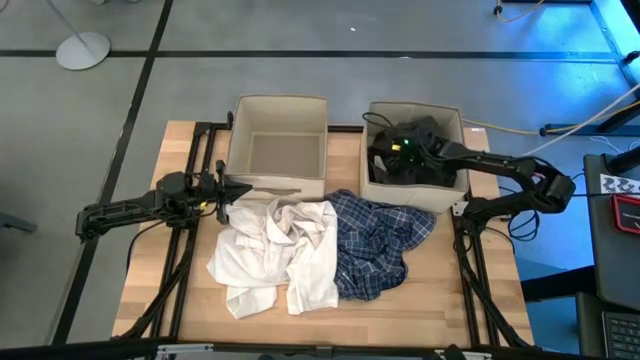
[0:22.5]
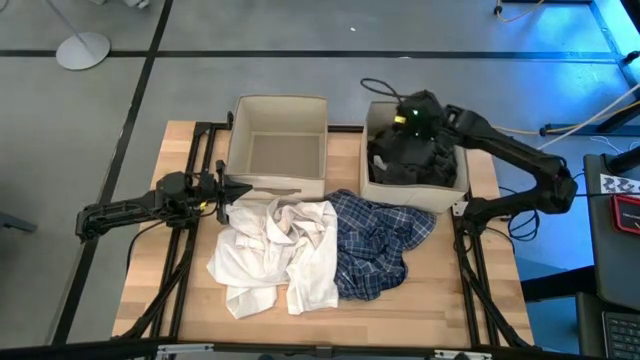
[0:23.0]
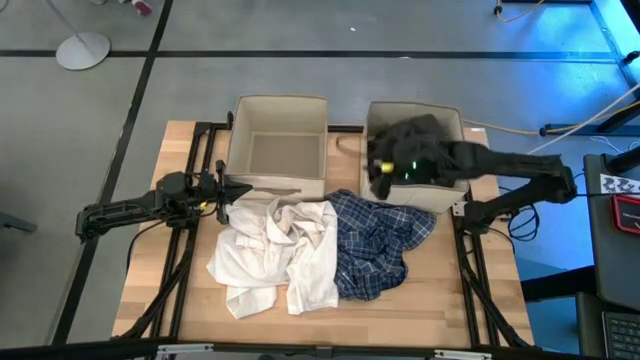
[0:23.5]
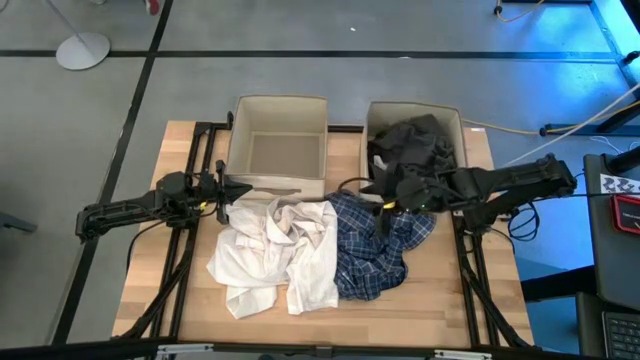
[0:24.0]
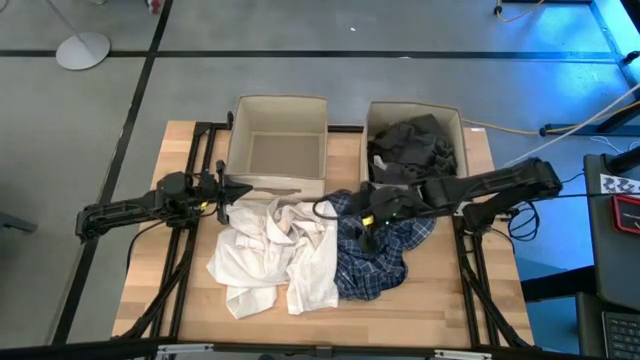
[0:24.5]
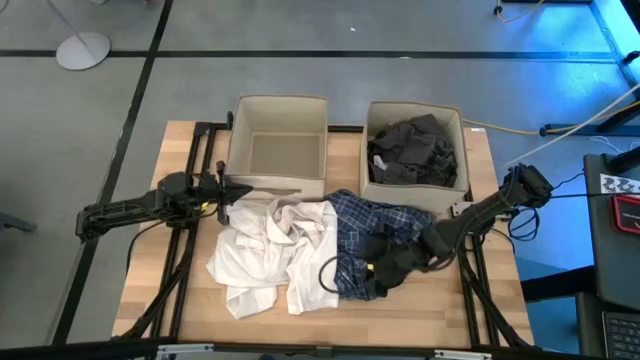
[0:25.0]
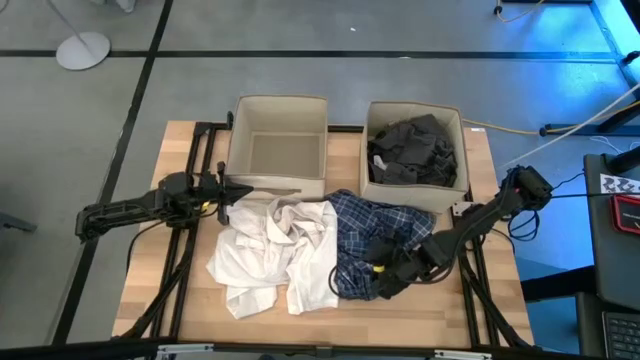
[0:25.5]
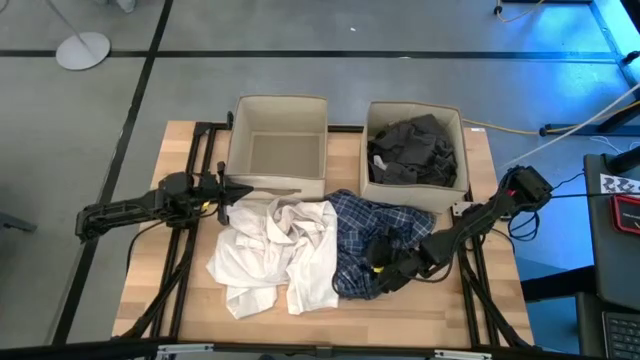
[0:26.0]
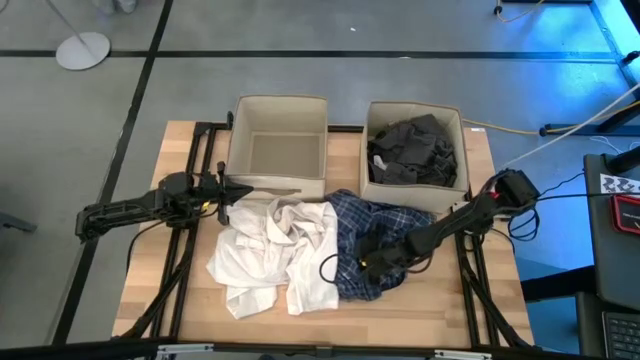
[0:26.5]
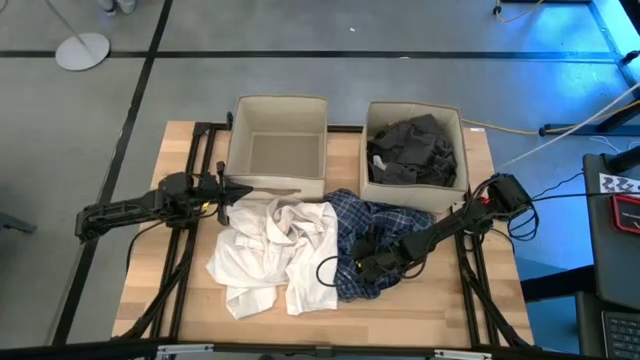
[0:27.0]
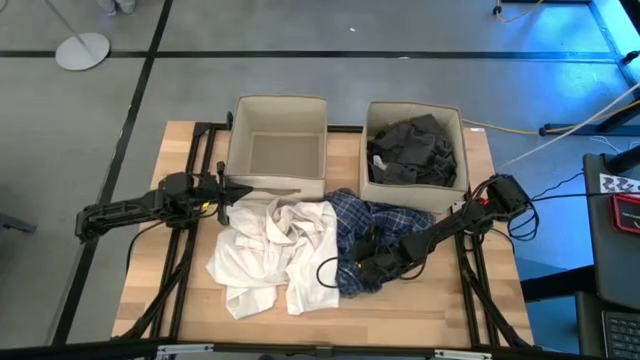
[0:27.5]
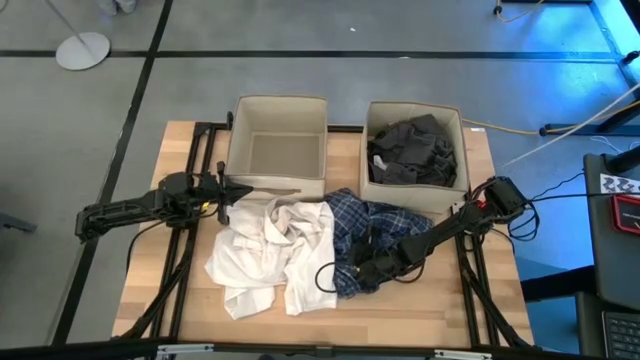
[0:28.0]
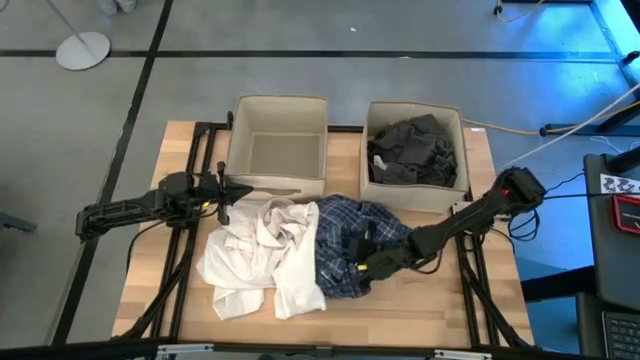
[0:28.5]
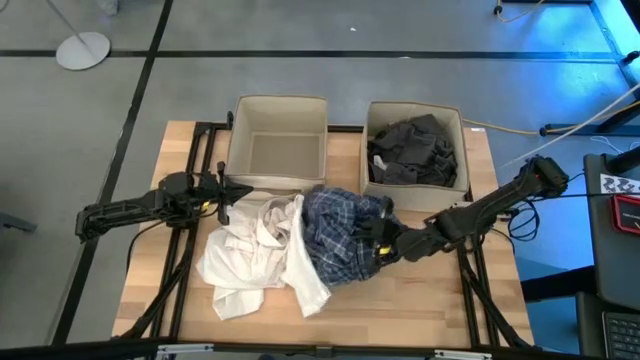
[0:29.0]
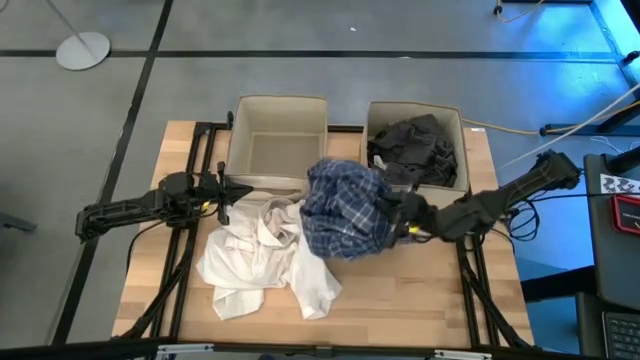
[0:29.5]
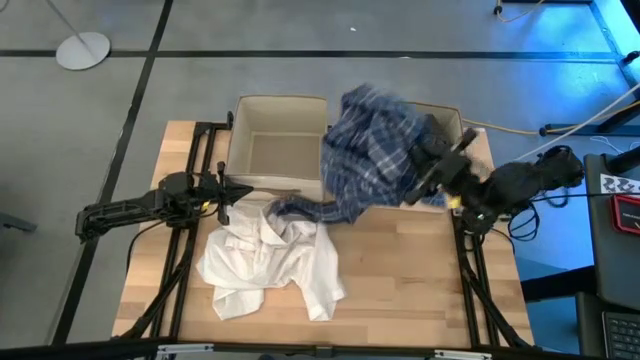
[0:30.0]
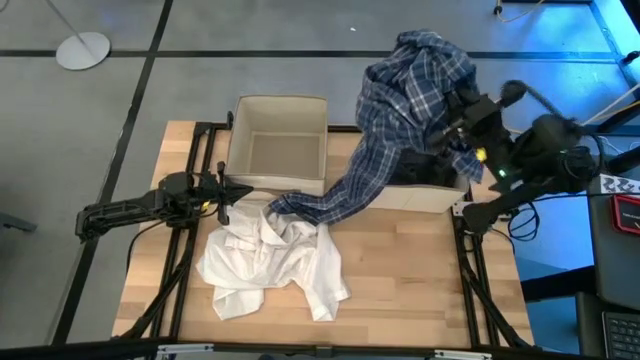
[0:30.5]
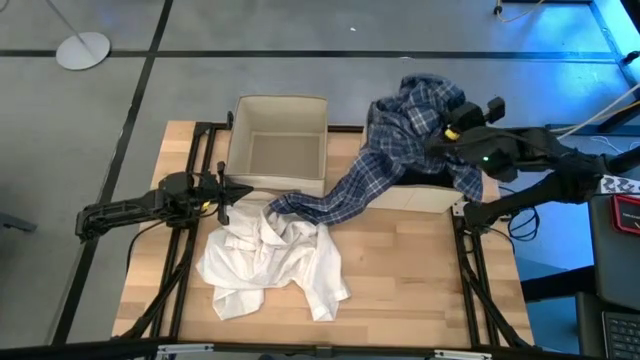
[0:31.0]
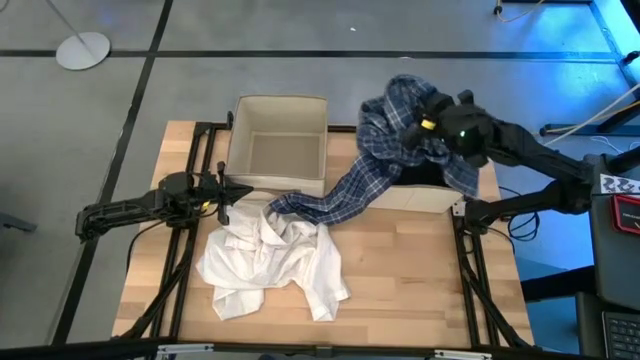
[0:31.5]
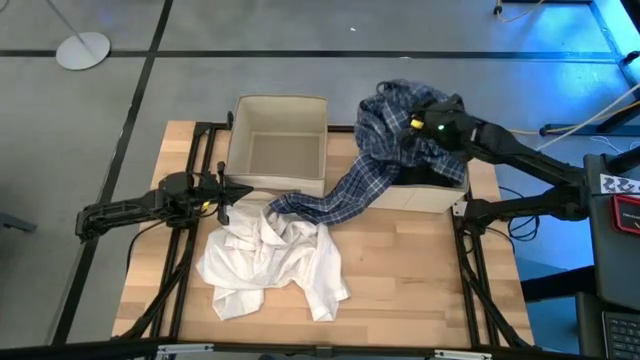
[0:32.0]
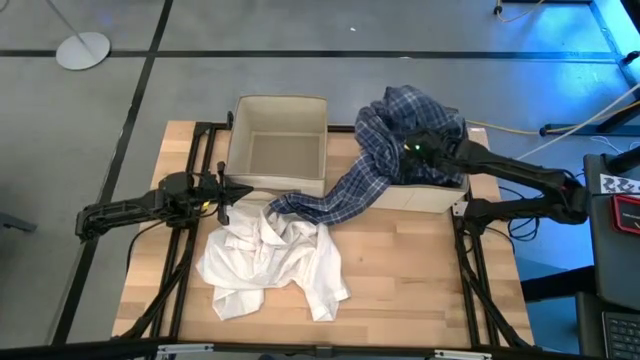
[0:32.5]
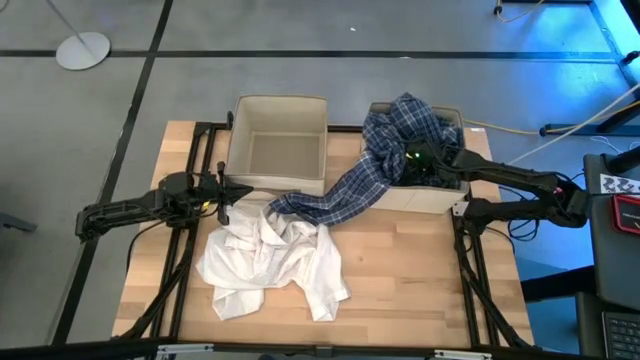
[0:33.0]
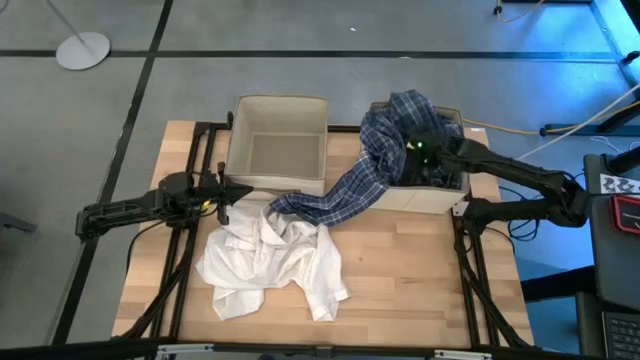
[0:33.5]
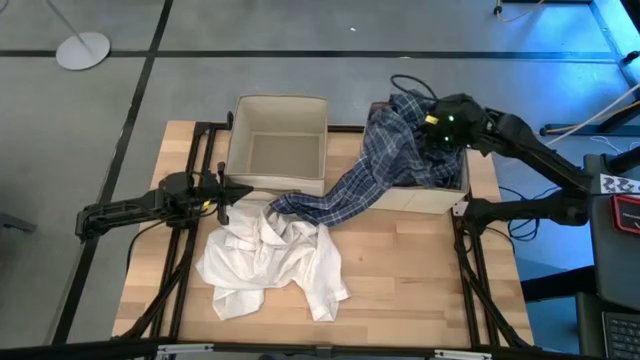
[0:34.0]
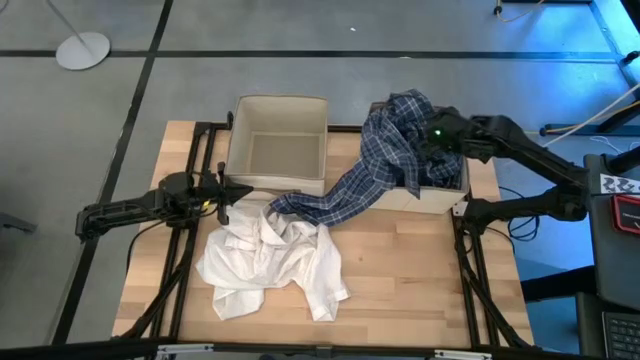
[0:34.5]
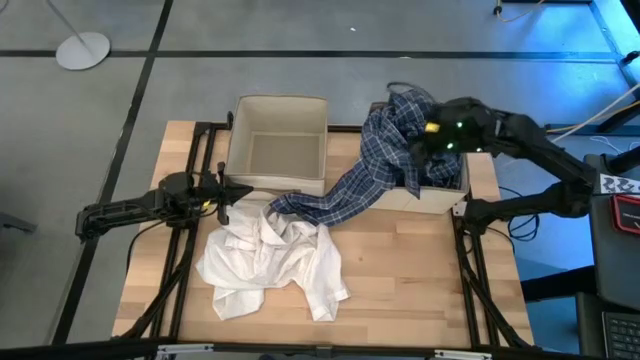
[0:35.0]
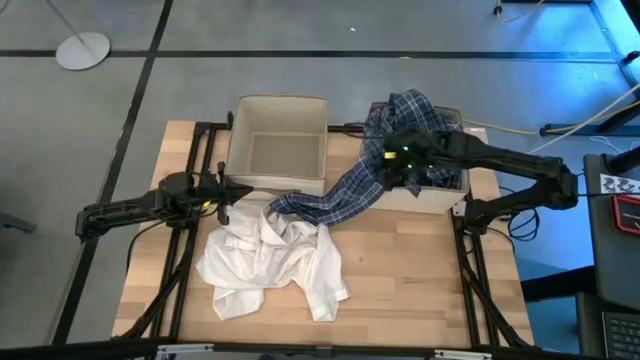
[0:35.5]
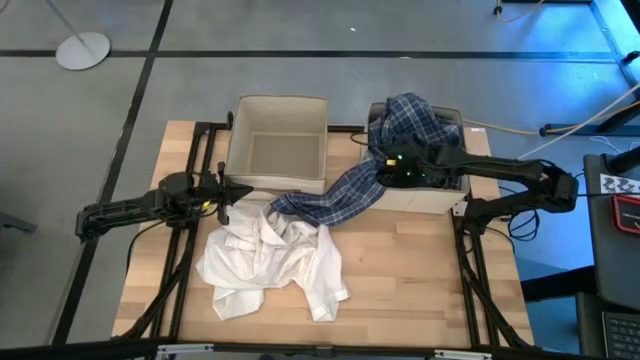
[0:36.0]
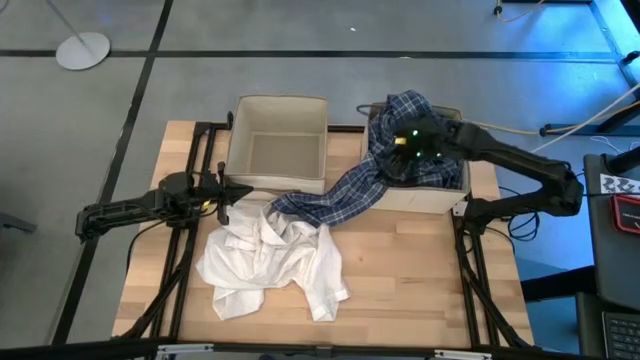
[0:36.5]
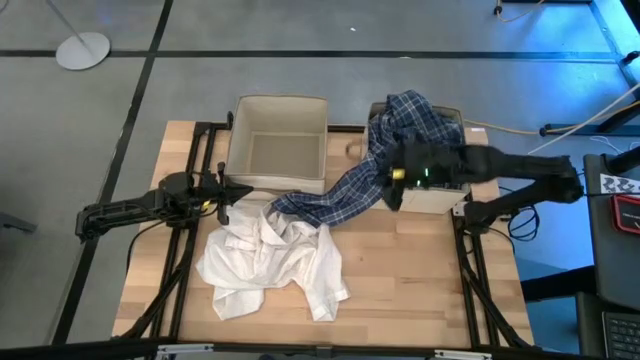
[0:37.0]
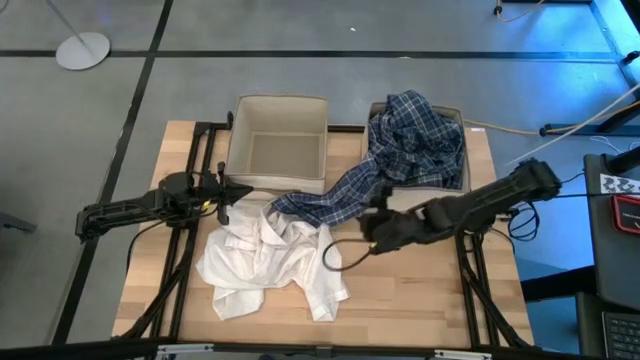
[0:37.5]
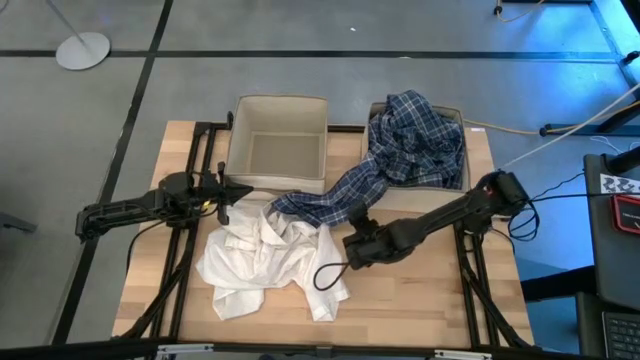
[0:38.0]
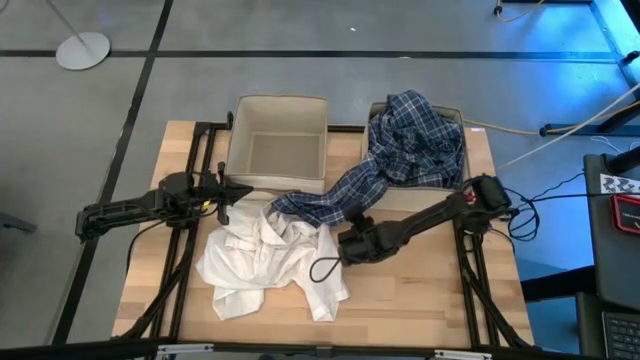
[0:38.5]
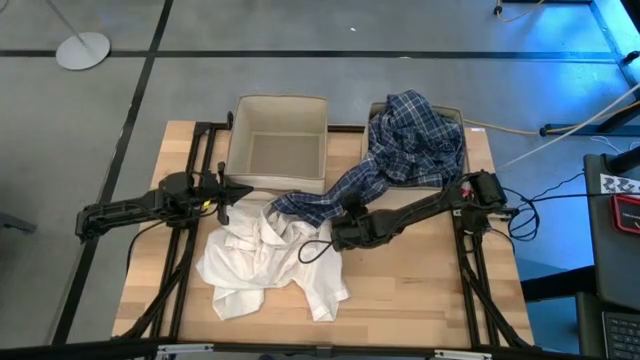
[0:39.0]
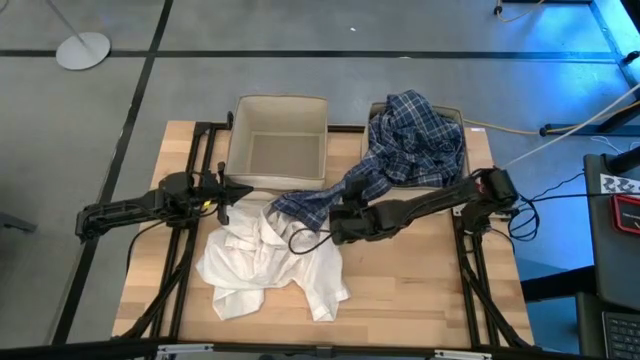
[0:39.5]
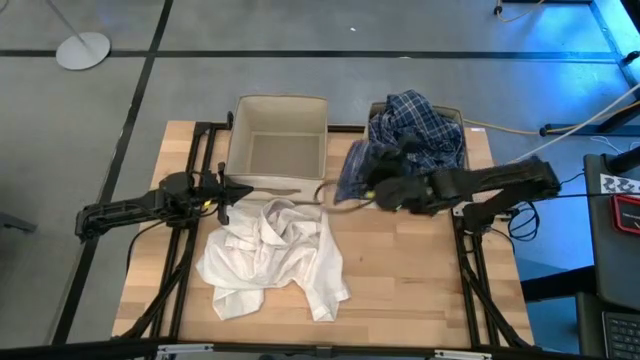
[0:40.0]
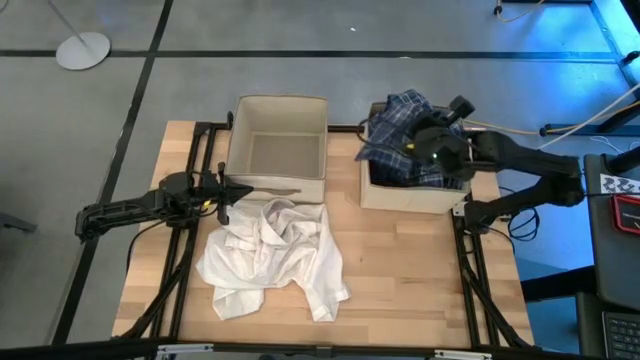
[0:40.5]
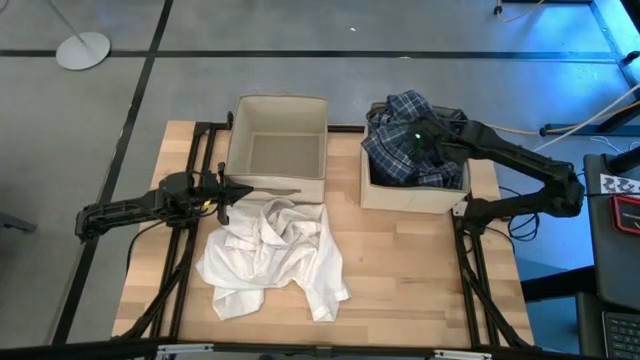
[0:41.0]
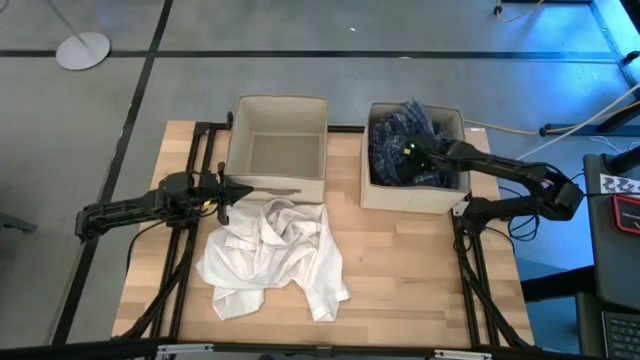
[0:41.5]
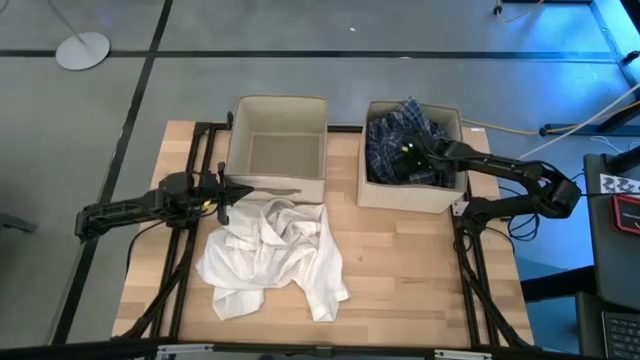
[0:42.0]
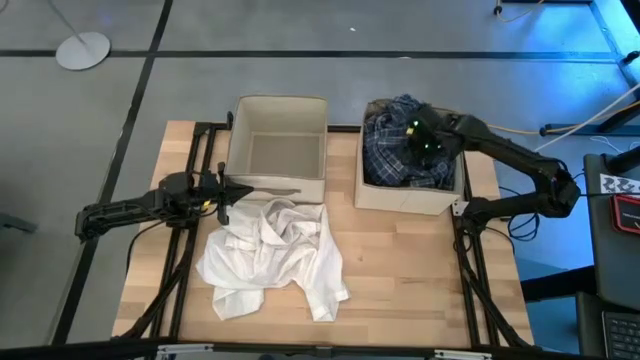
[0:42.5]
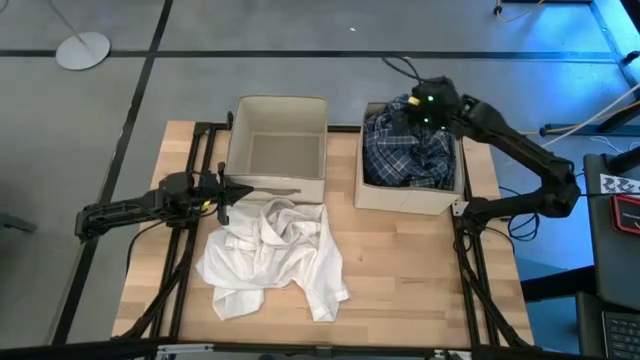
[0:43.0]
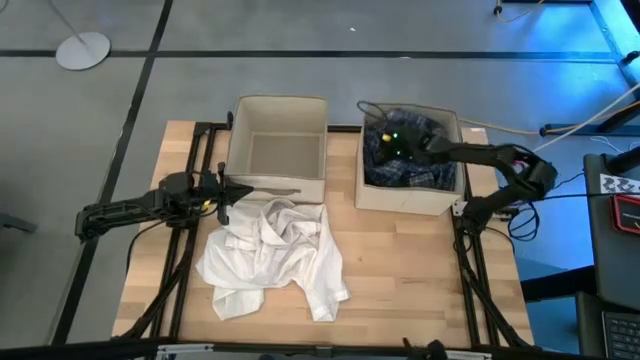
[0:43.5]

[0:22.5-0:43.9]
Task: Sort clothes
Put the blue plaid polo shirt in the right laundry organizer
